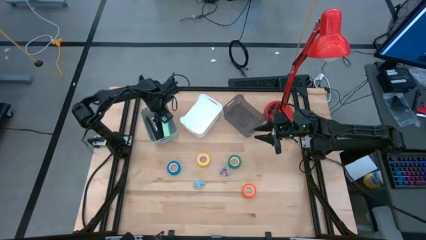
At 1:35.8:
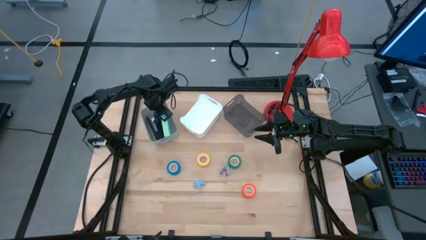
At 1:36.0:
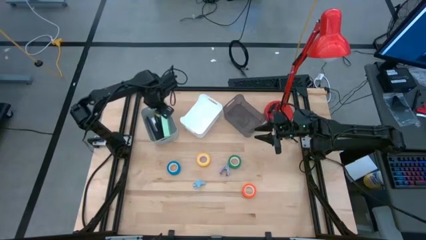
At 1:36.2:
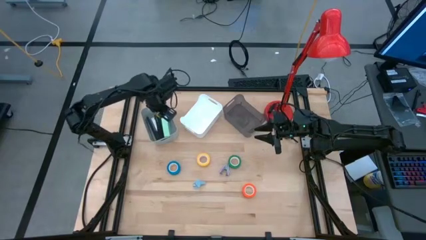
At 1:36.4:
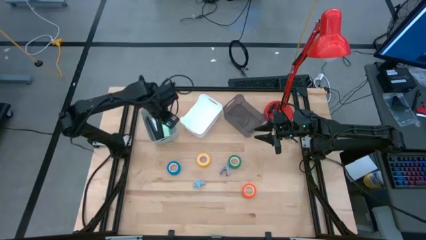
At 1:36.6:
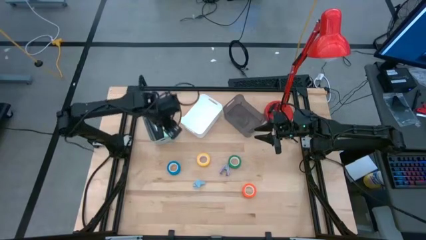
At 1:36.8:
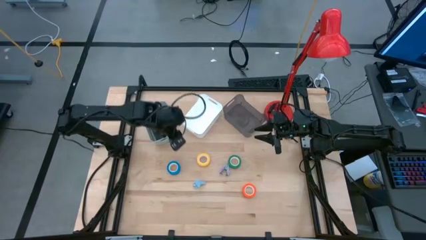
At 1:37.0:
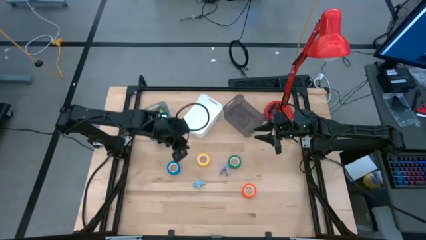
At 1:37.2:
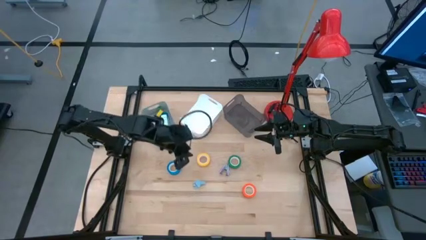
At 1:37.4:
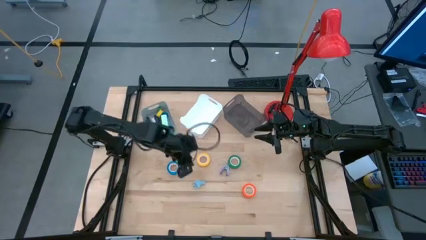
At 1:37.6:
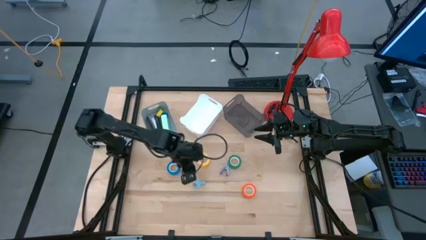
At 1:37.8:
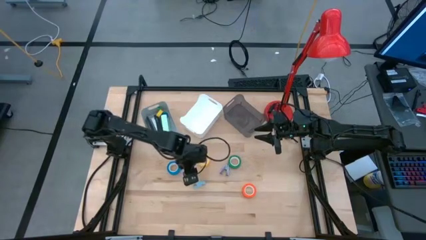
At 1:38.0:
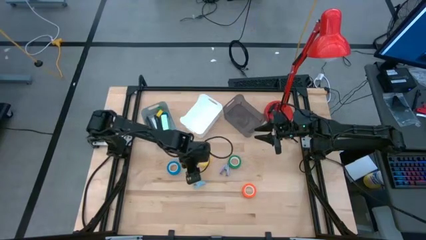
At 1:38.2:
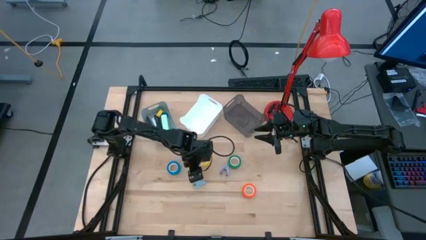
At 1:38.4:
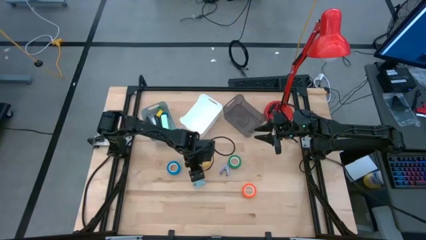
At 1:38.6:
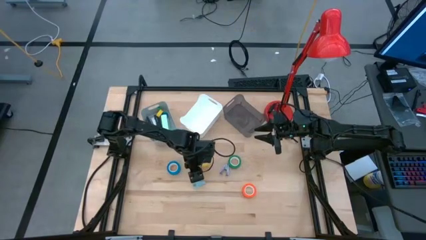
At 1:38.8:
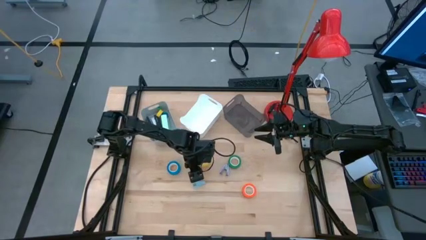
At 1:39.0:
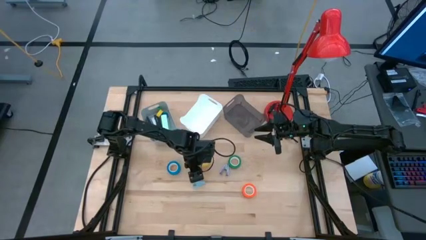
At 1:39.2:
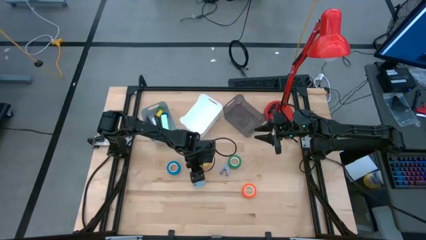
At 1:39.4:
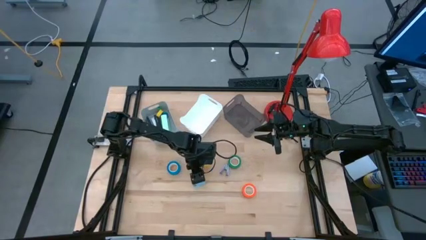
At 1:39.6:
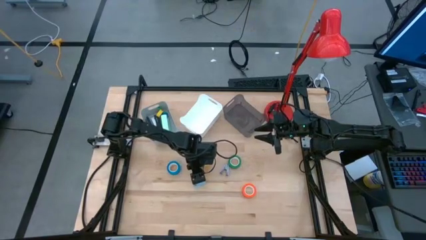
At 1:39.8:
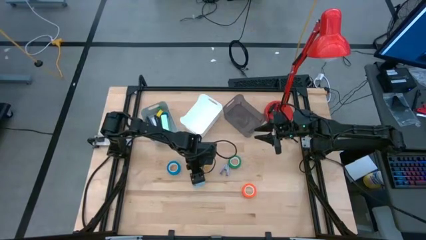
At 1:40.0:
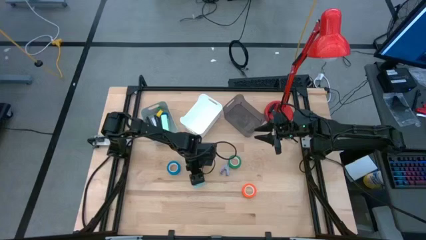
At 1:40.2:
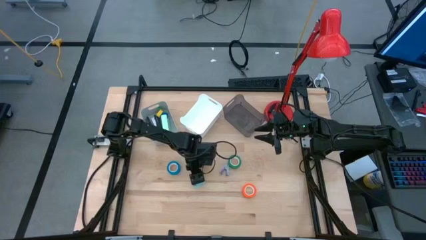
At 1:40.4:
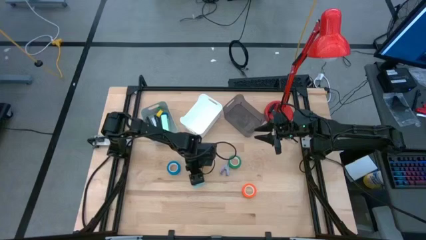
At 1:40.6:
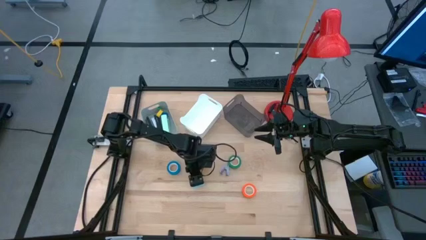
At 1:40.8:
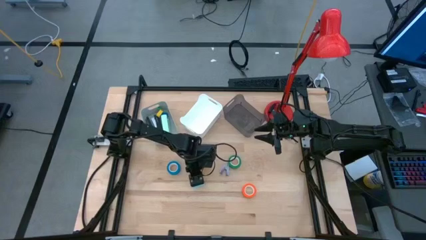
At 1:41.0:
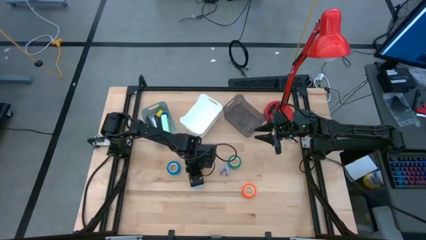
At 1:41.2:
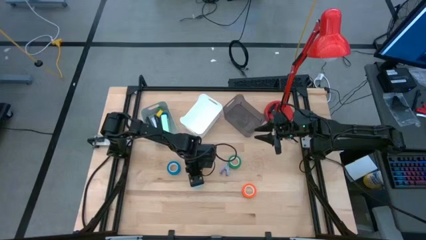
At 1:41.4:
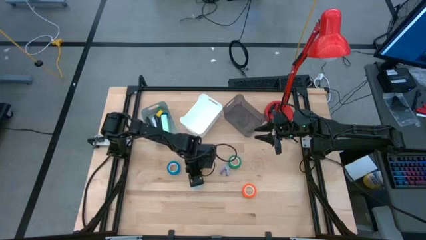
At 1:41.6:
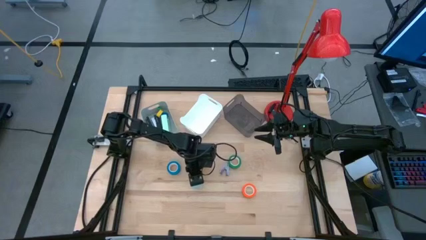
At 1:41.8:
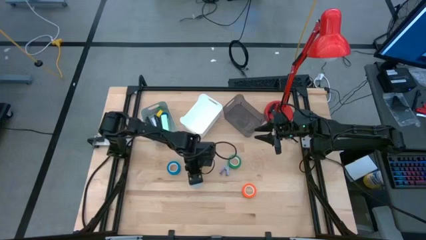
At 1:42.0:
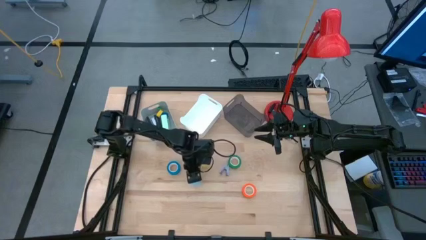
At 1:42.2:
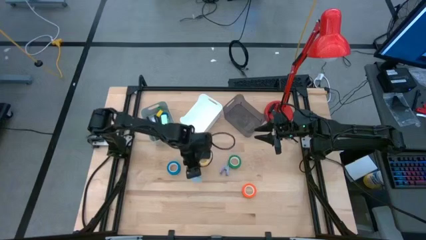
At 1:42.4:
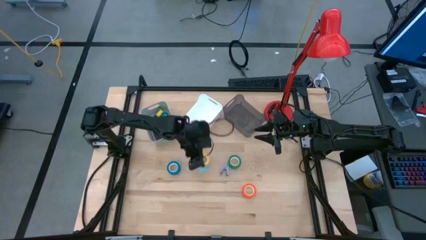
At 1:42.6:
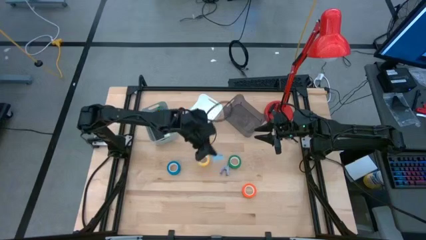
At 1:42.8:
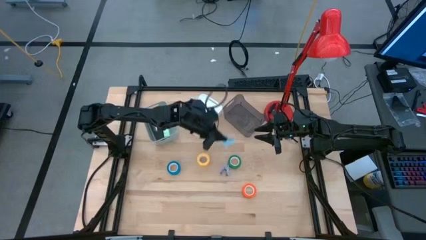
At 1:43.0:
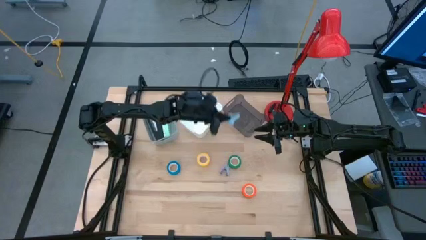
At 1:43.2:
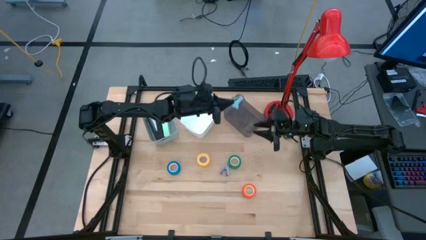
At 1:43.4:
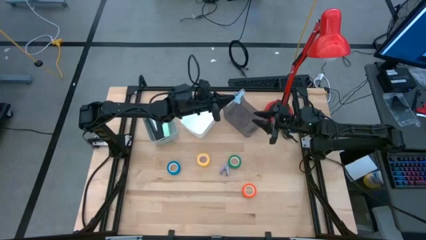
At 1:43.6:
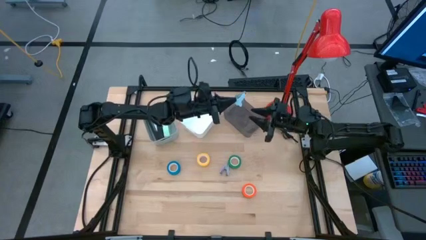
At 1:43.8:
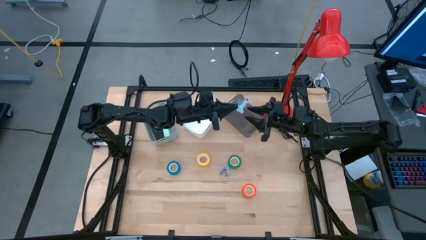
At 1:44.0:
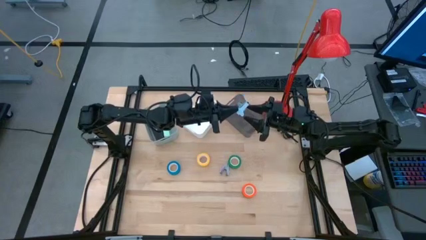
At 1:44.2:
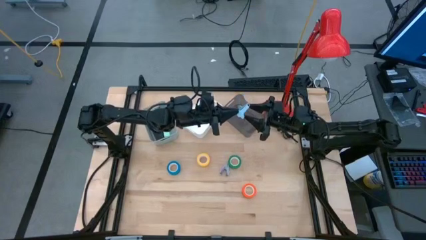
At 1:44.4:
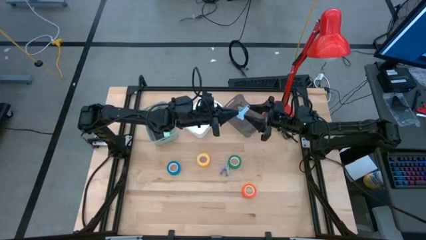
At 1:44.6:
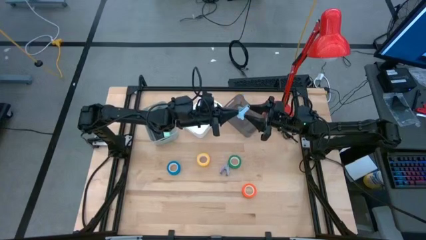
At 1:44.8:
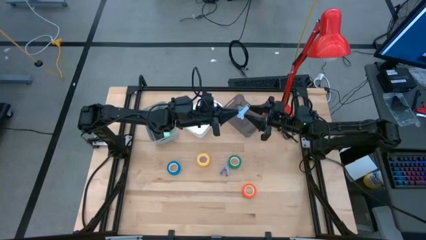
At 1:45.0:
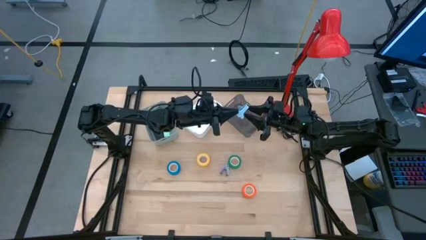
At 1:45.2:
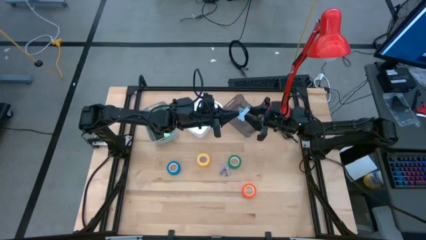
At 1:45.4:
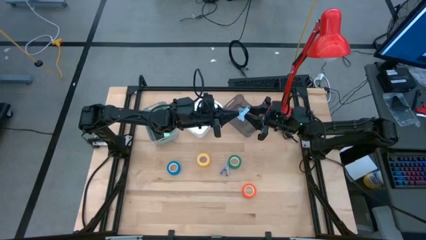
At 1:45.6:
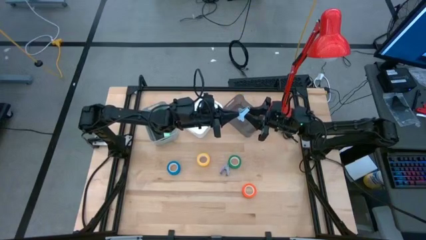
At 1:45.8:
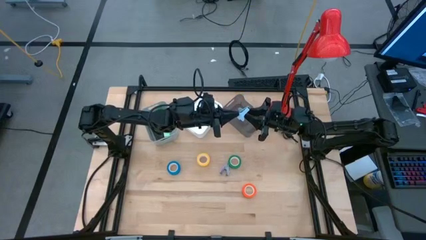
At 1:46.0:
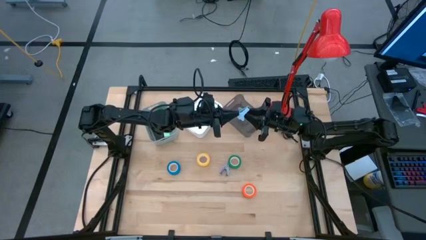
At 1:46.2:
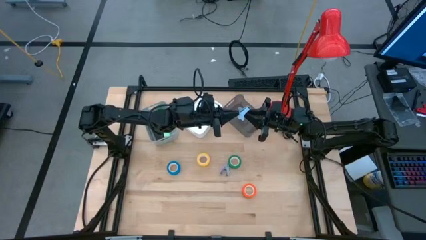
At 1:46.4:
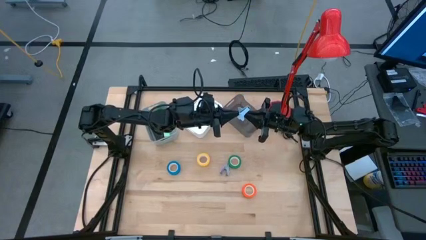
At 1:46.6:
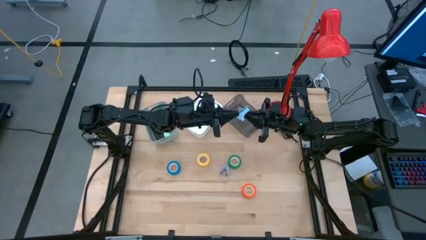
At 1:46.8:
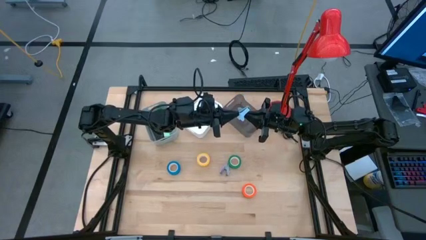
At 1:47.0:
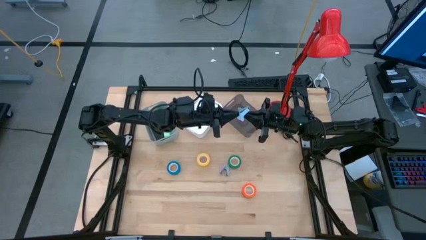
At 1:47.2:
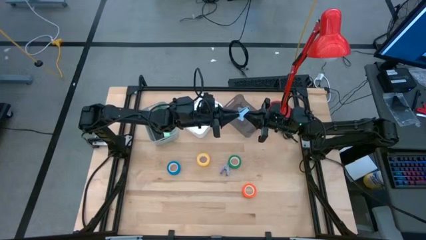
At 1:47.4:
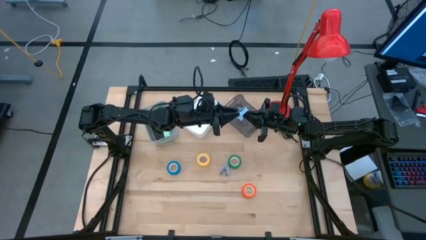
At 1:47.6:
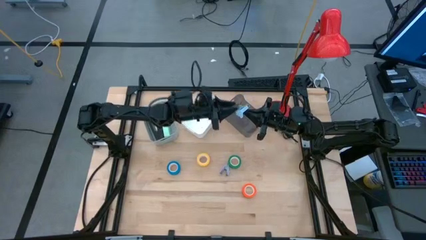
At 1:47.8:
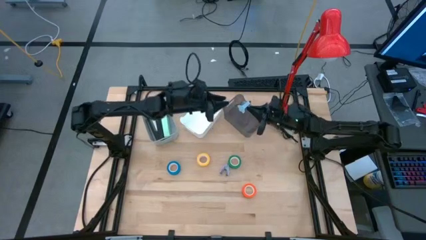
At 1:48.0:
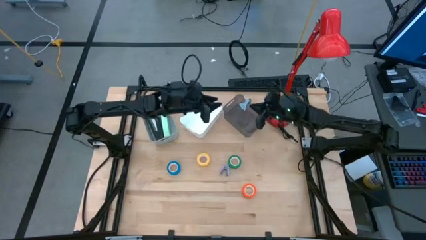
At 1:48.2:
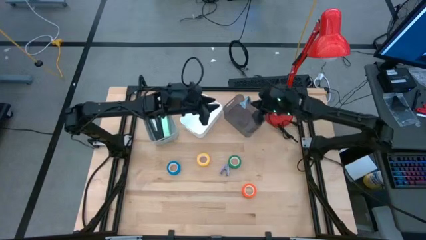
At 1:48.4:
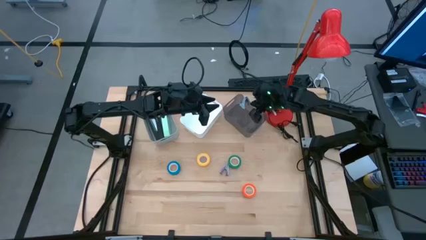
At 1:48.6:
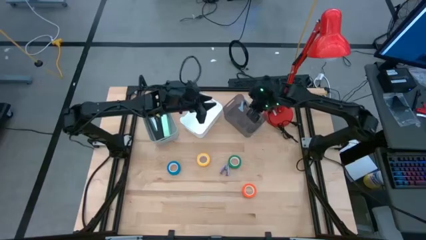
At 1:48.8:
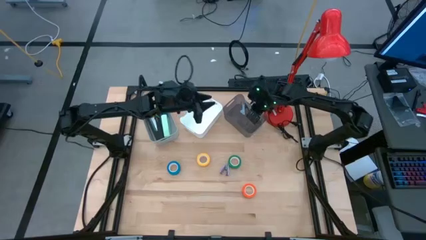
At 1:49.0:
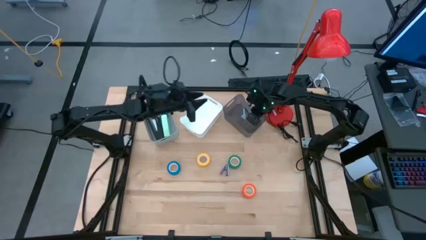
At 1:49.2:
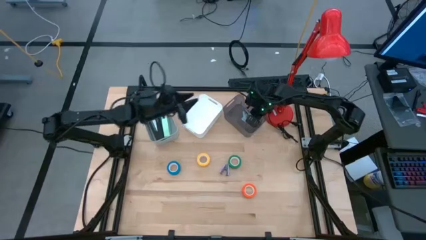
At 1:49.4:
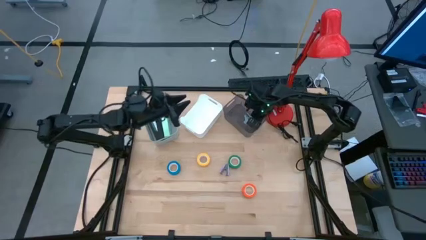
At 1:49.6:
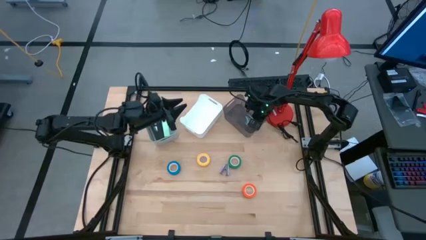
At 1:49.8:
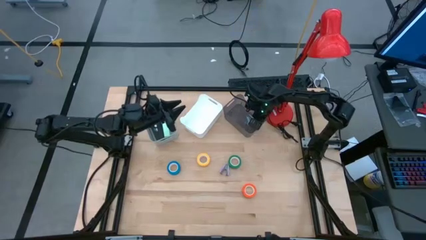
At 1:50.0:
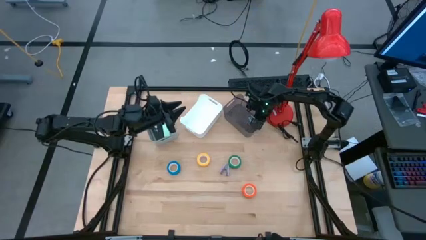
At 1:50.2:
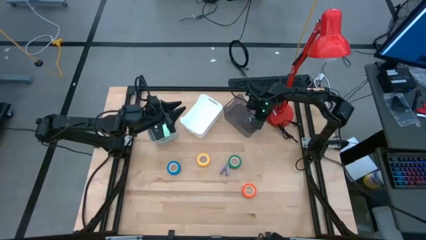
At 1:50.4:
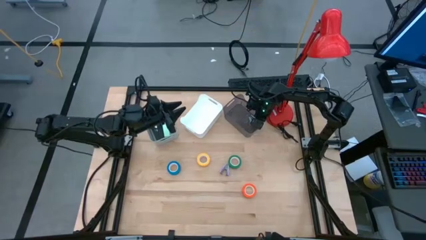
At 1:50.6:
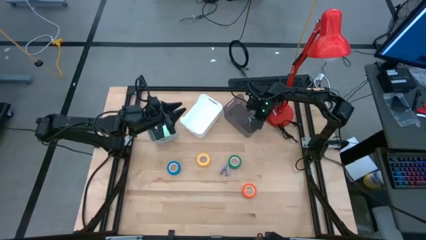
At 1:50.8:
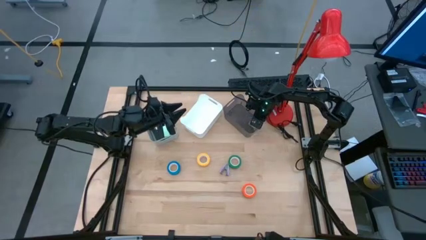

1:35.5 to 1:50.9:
Task: Pick and place Stapler, Stapler remover, tape
Put the blue staple remover into the black bin
